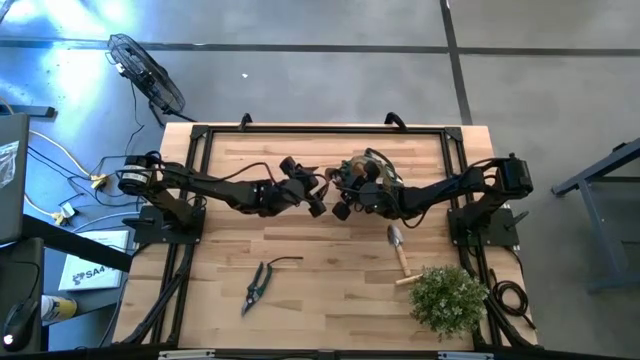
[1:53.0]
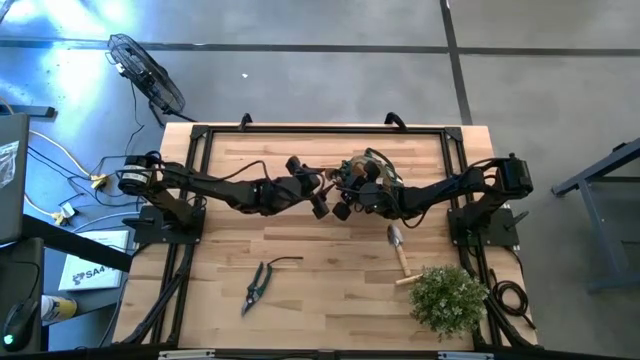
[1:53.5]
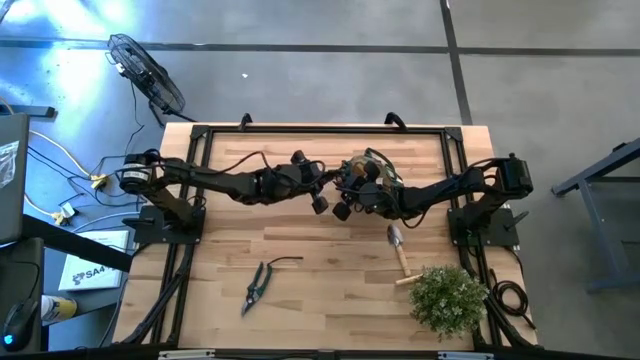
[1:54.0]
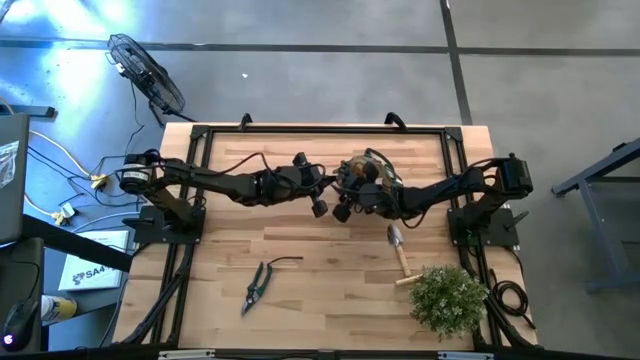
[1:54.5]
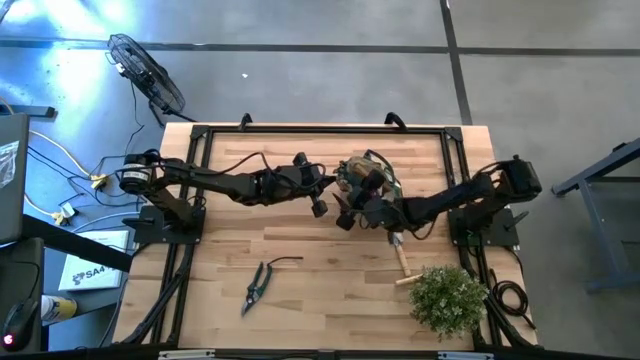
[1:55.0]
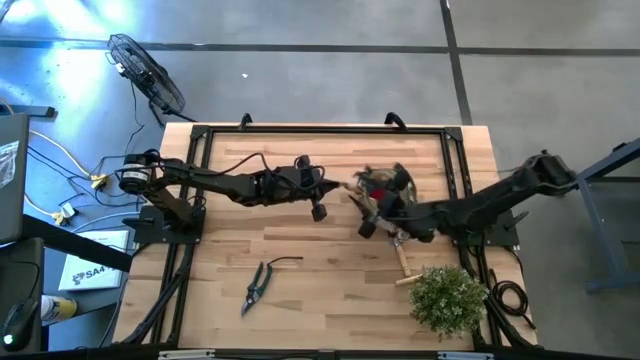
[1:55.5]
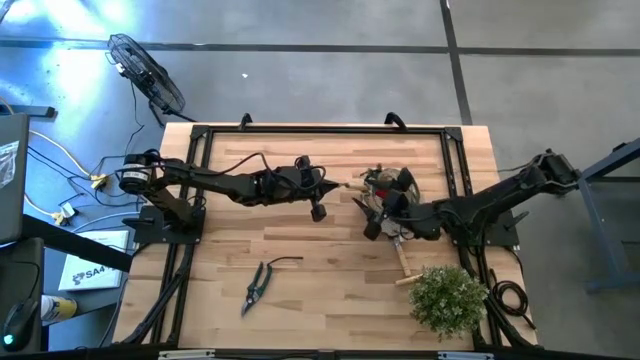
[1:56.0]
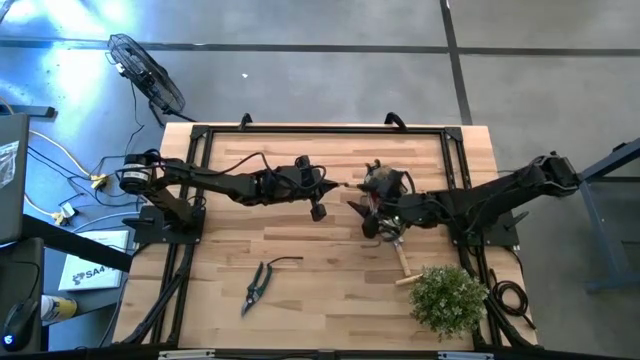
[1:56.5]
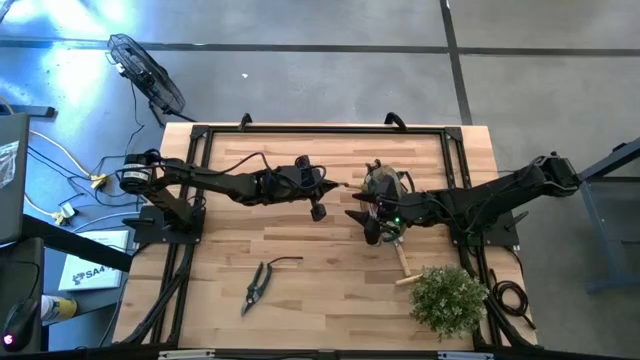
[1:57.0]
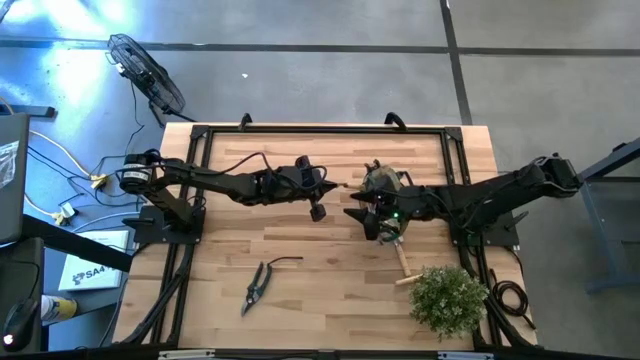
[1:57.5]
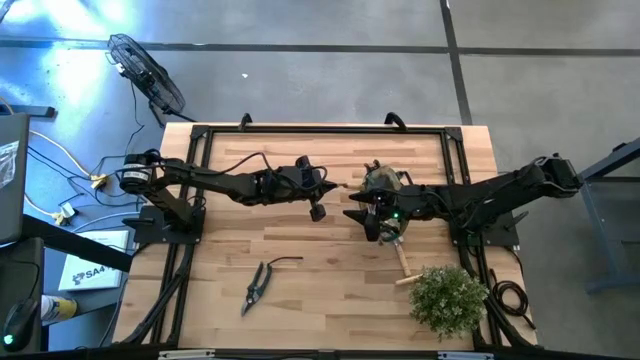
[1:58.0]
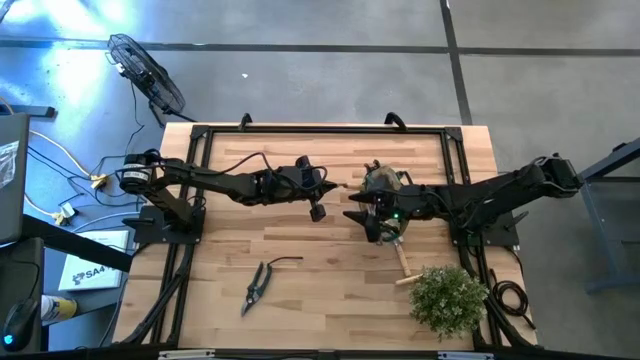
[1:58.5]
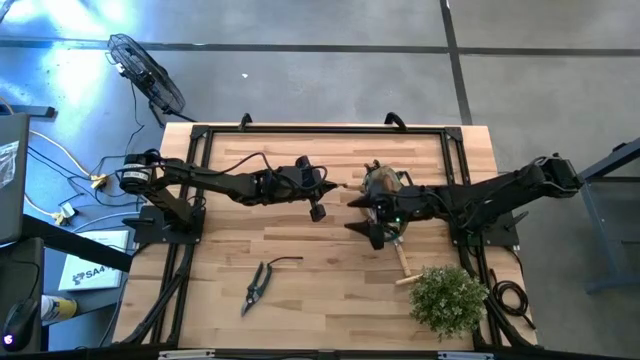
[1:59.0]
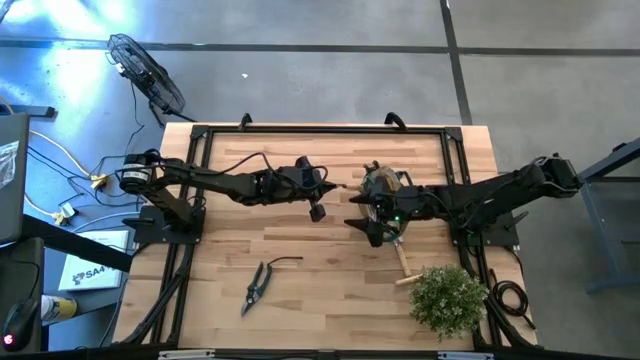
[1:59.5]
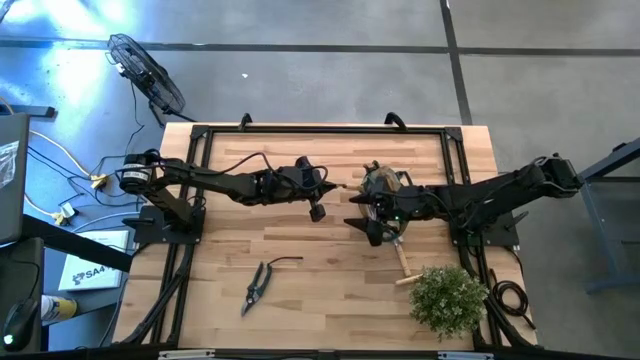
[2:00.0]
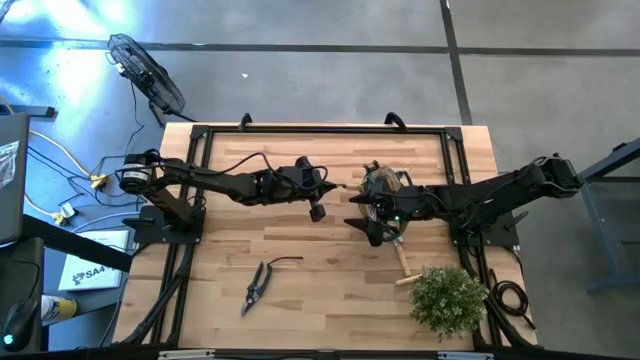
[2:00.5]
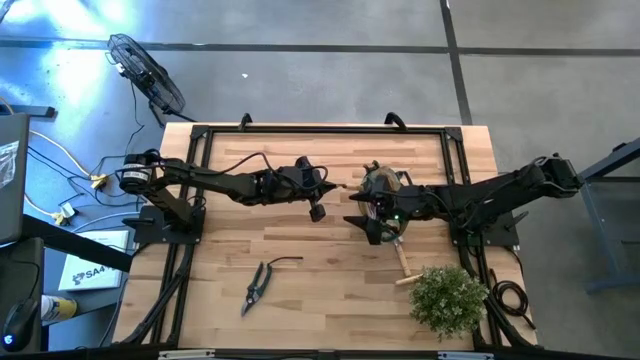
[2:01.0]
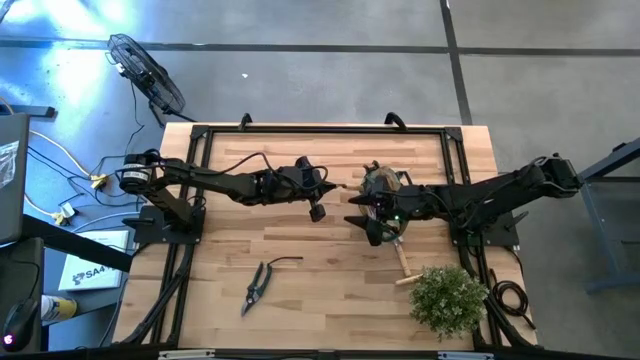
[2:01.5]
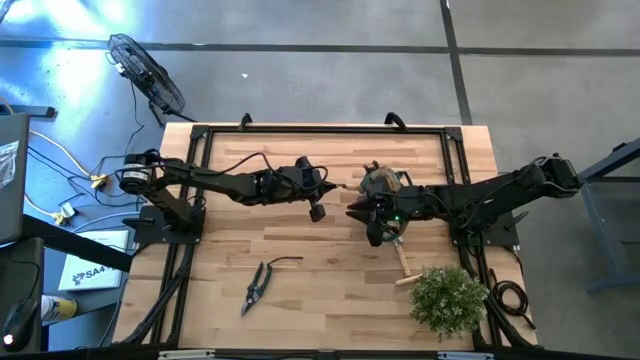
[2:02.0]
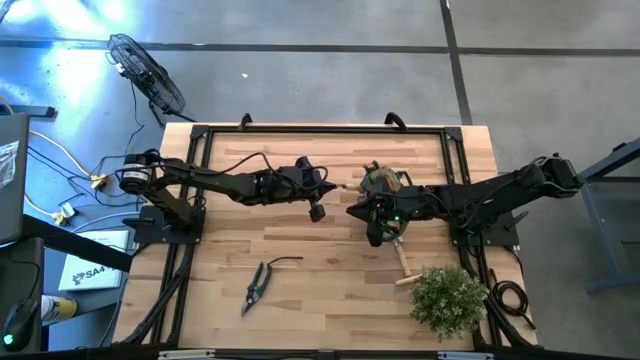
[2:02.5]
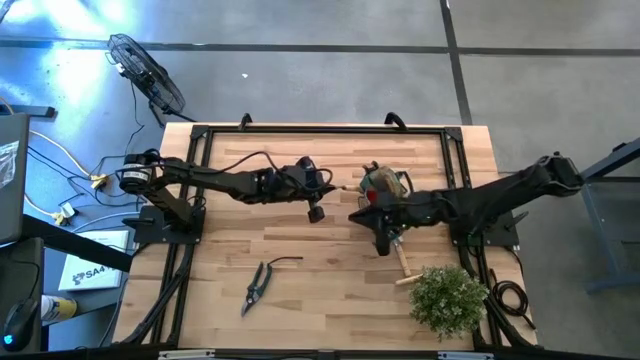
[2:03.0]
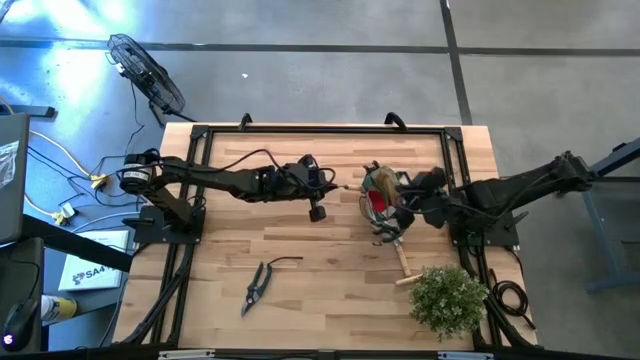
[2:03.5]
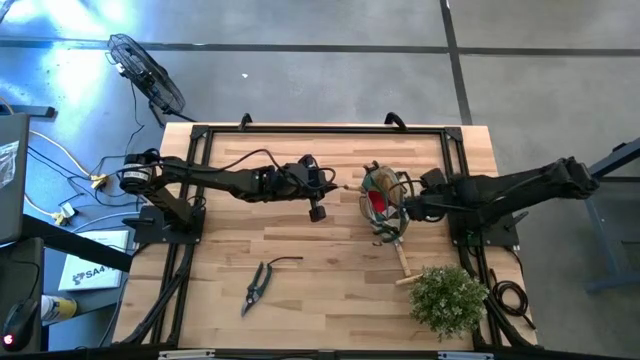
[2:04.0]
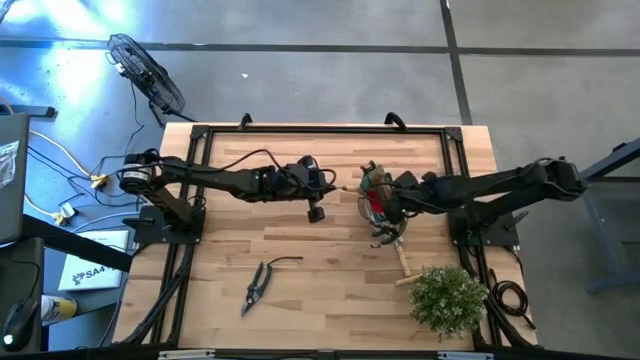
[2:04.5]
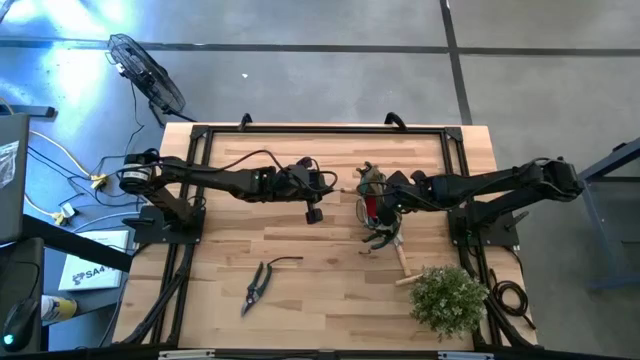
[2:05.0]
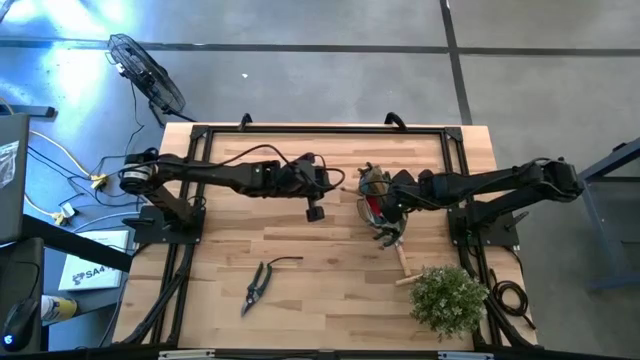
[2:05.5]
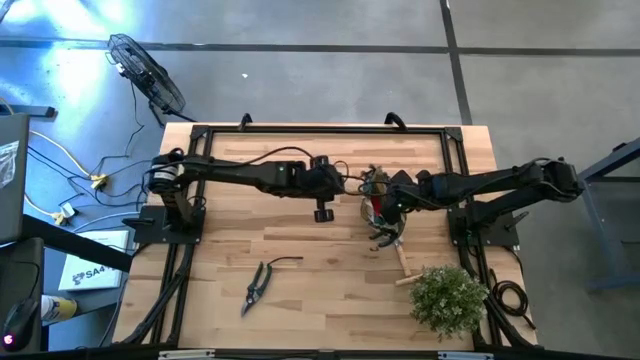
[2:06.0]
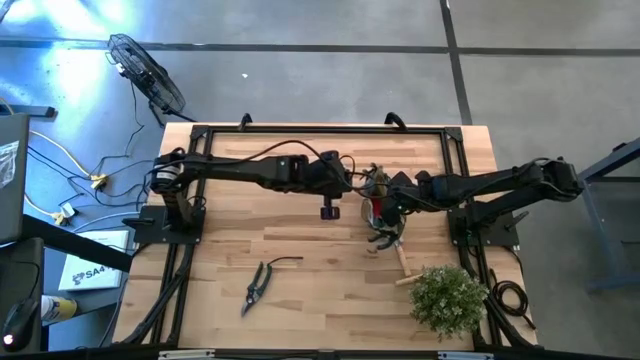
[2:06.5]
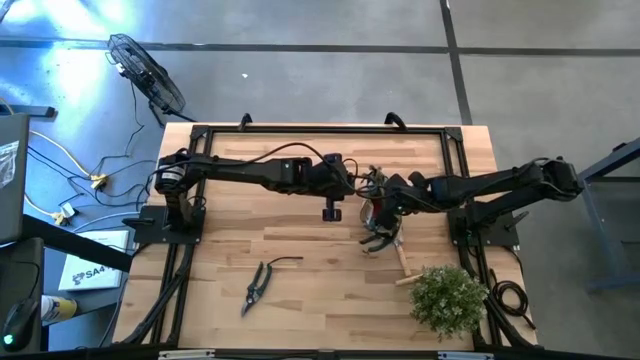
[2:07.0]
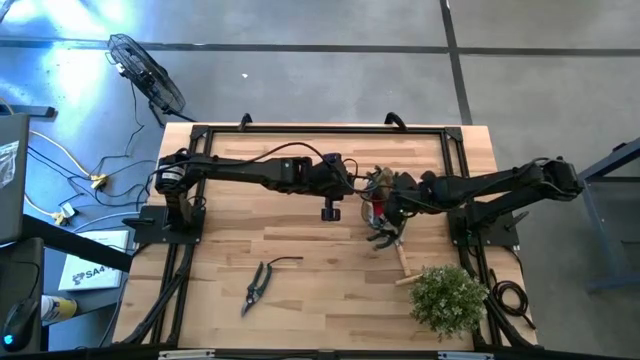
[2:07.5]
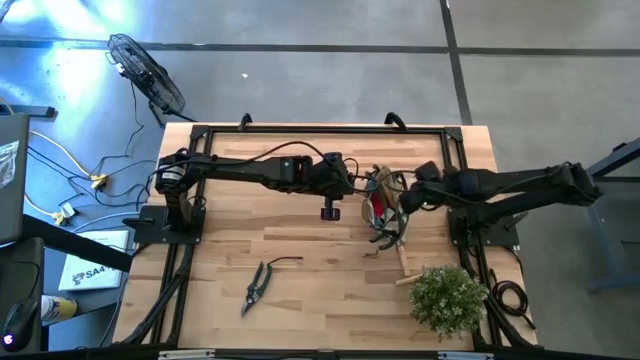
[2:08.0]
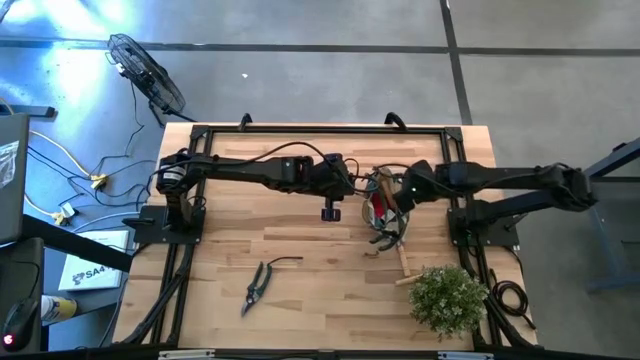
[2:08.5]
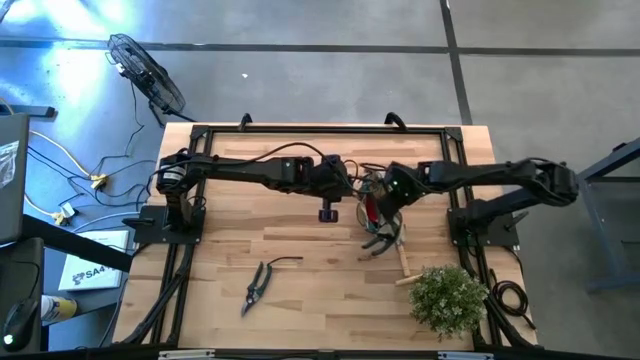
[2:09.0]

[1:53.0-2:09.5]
Task: Pick & Place Garden tools in Gardening bag
Put the bottom left brown trowel into the light brown gardening bag

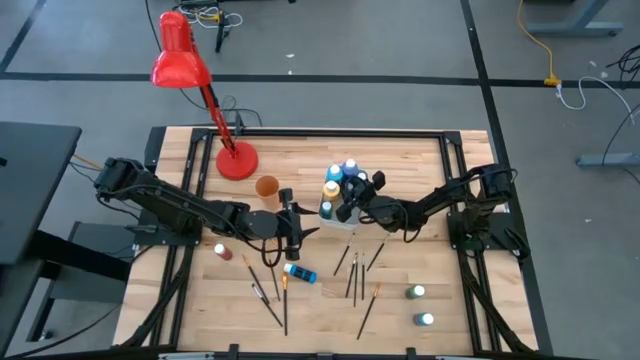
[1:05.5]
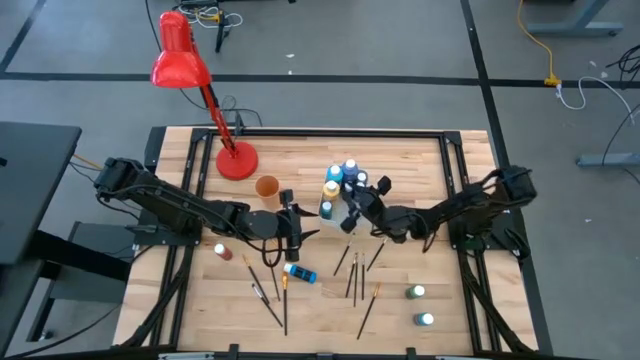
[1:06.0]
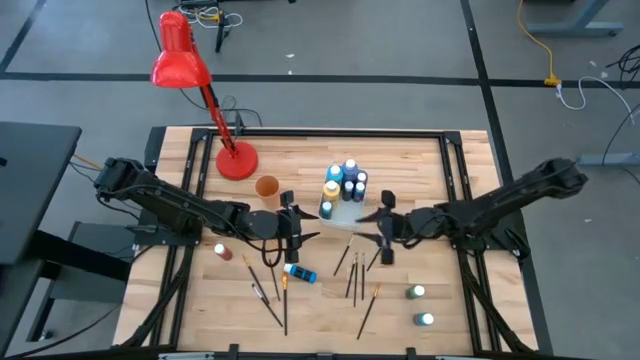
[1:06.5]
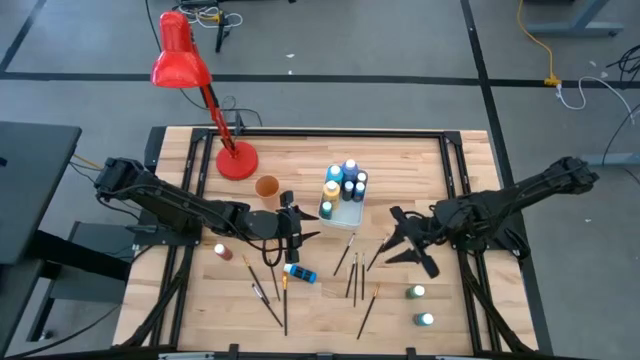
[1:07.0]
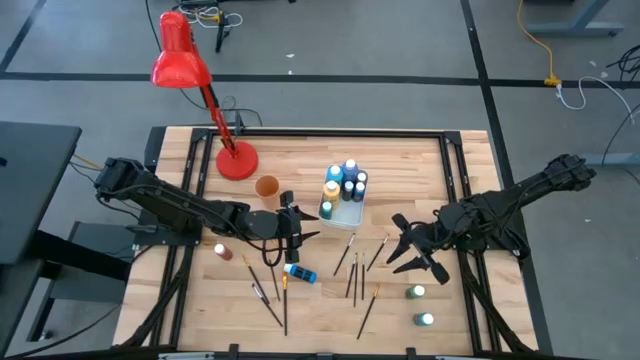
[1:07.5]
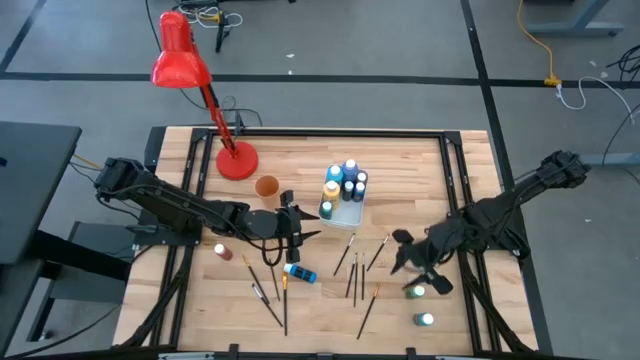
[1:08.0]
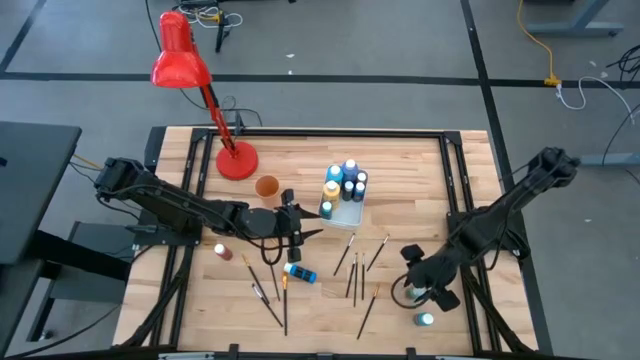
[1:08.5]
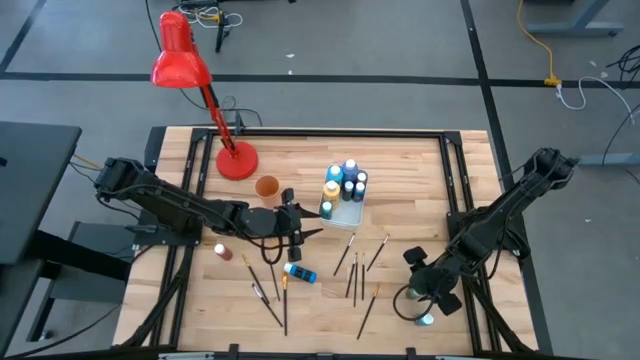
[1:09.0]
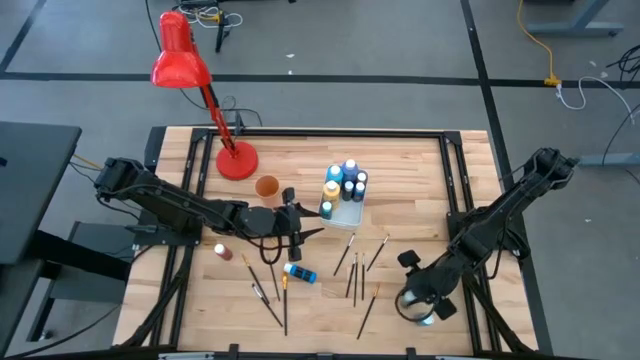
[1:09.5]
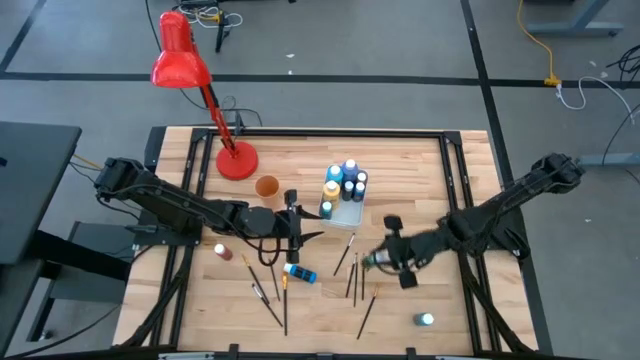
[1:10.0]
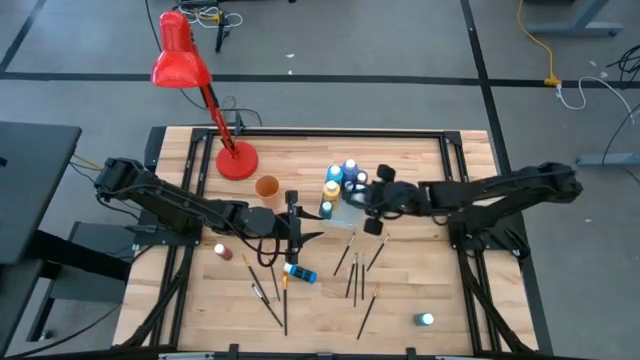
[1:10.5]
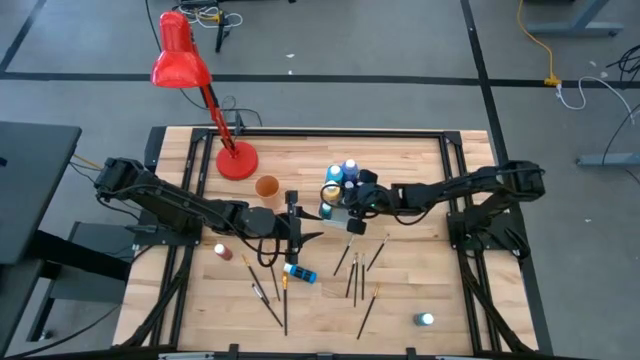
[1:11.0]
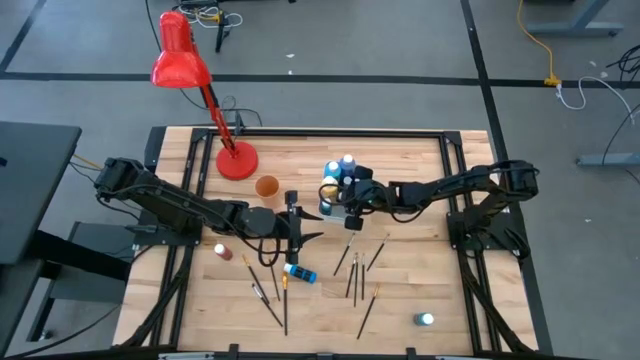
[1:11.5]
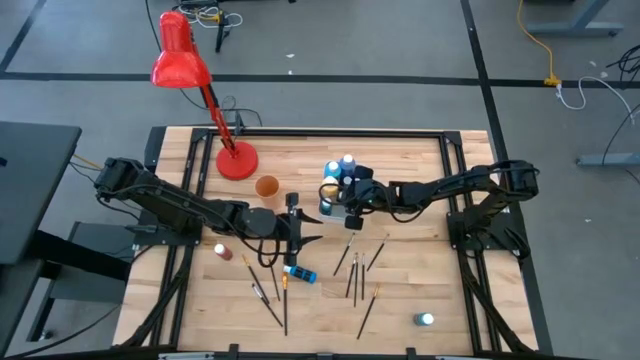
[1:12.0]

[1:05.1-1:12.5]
Task: Pick & Place Paint Supplies
Put the small green paint bottle into the white bin
